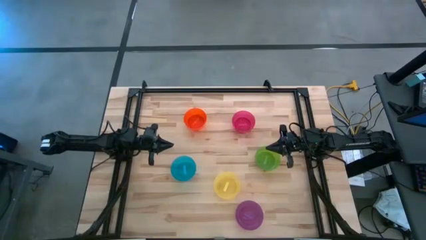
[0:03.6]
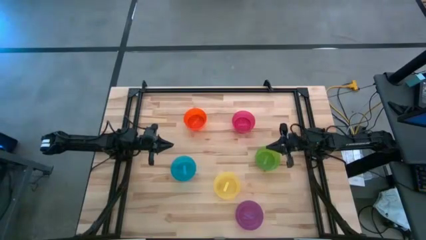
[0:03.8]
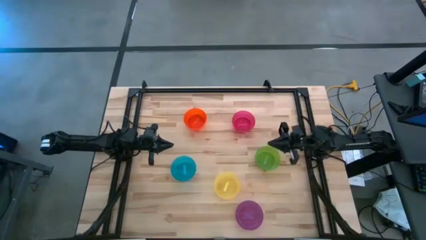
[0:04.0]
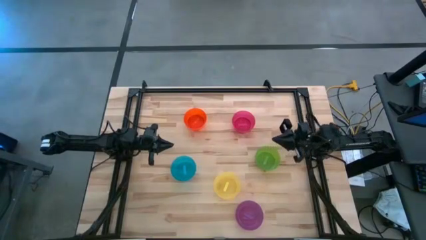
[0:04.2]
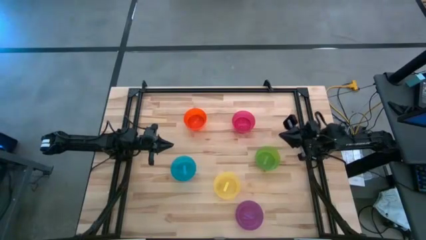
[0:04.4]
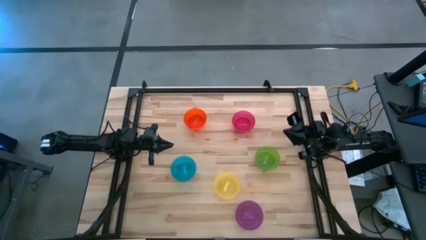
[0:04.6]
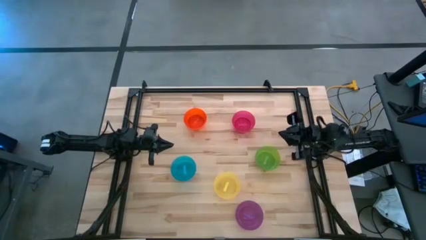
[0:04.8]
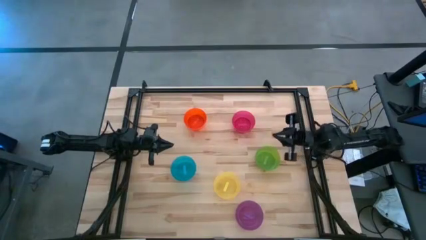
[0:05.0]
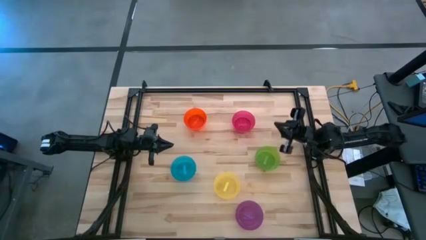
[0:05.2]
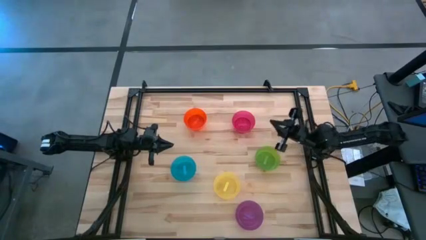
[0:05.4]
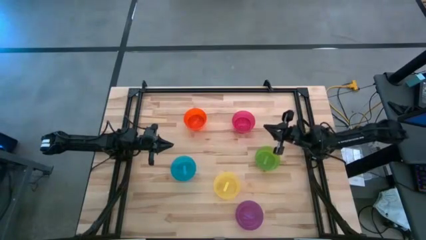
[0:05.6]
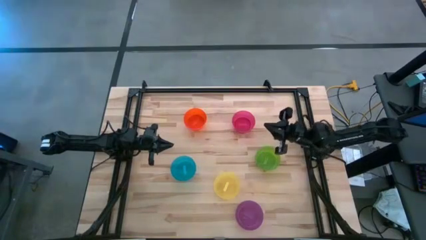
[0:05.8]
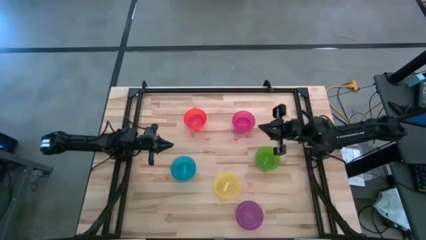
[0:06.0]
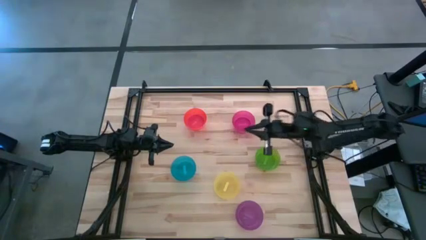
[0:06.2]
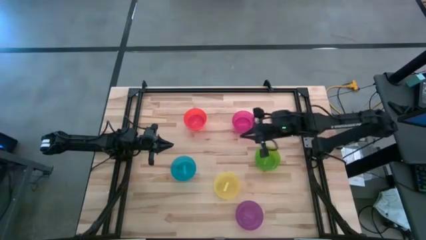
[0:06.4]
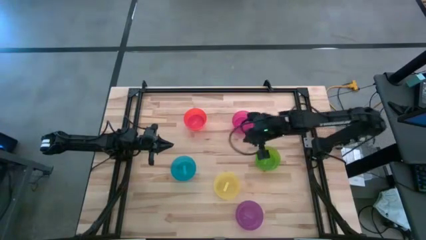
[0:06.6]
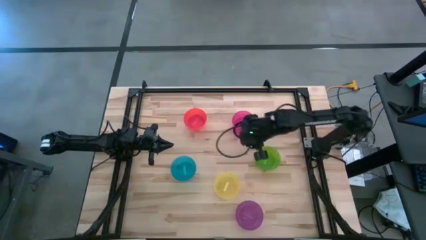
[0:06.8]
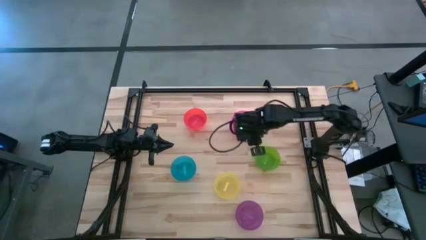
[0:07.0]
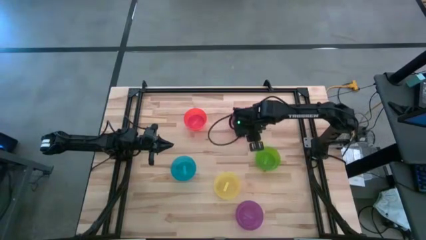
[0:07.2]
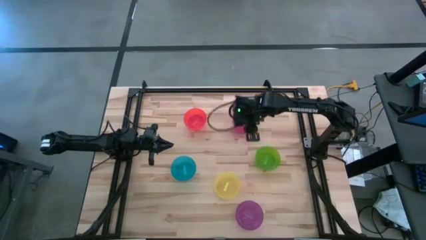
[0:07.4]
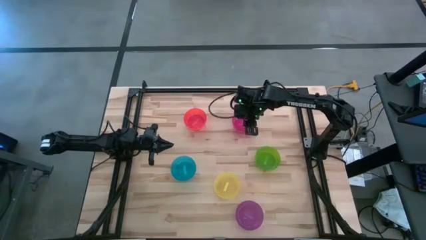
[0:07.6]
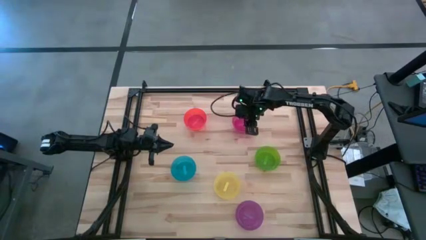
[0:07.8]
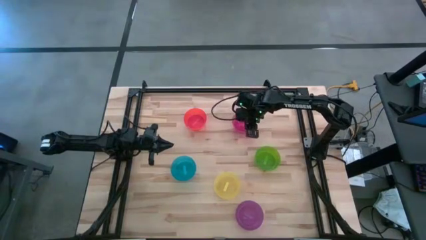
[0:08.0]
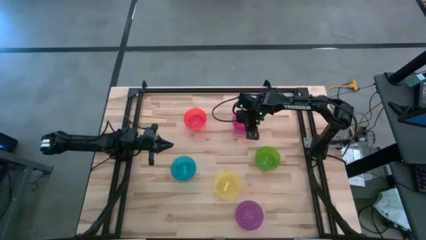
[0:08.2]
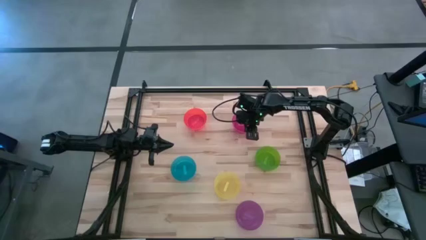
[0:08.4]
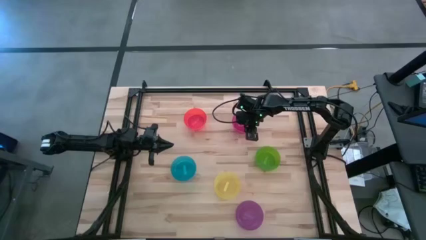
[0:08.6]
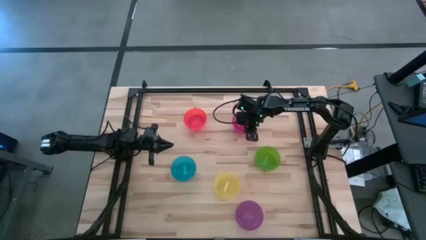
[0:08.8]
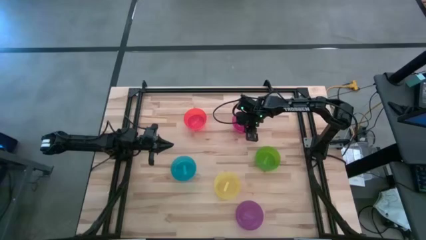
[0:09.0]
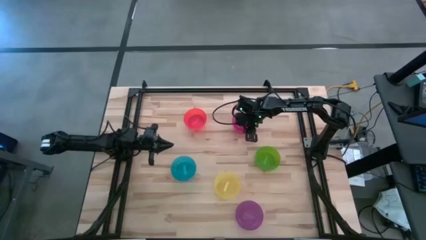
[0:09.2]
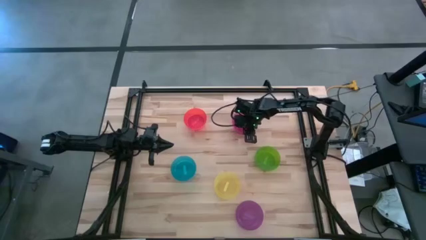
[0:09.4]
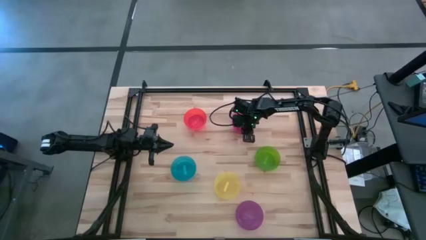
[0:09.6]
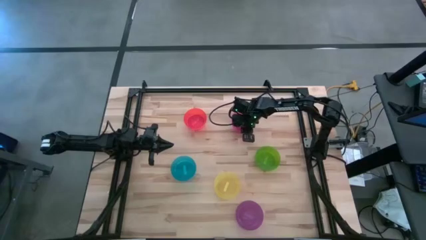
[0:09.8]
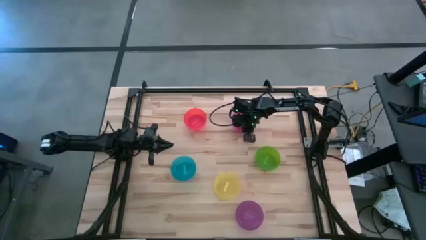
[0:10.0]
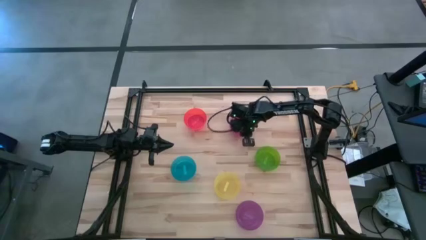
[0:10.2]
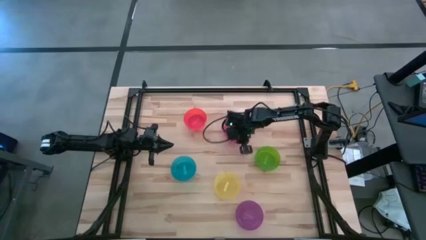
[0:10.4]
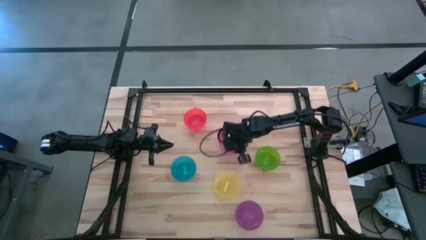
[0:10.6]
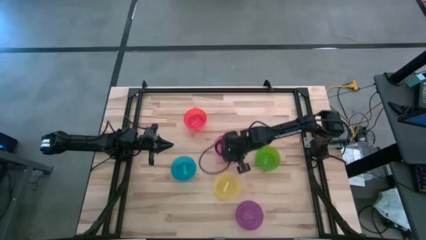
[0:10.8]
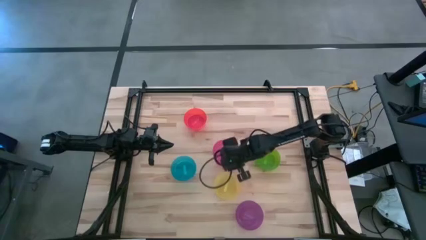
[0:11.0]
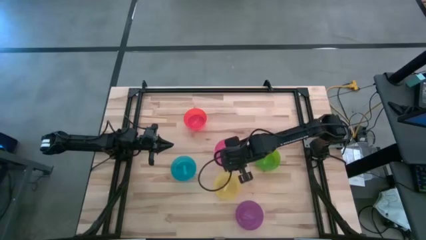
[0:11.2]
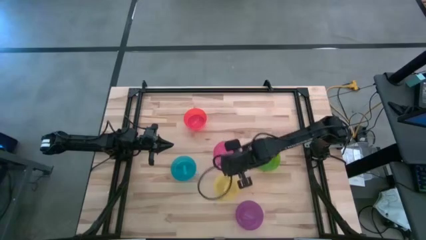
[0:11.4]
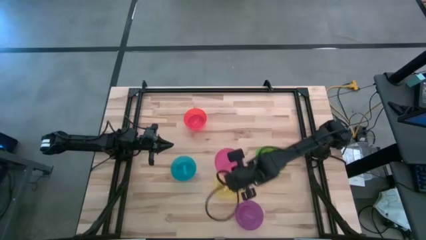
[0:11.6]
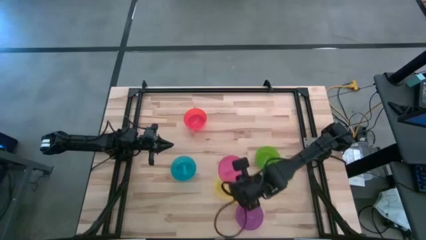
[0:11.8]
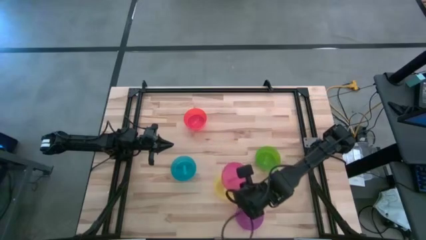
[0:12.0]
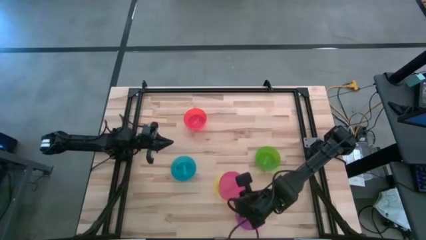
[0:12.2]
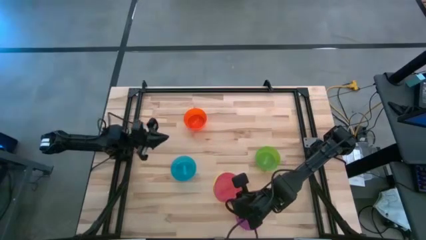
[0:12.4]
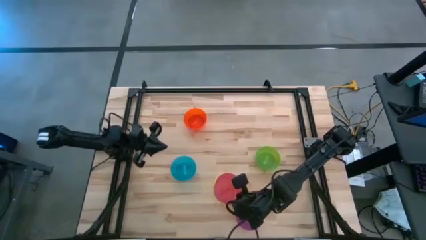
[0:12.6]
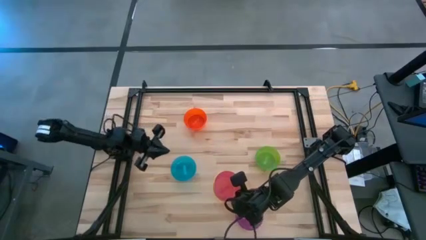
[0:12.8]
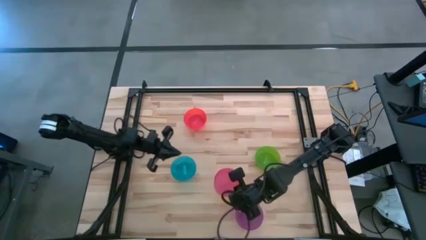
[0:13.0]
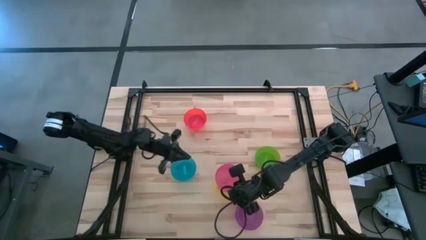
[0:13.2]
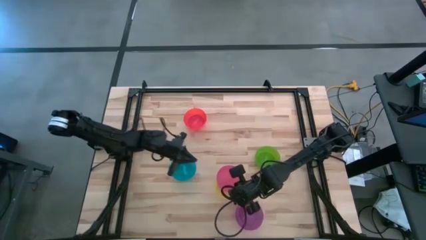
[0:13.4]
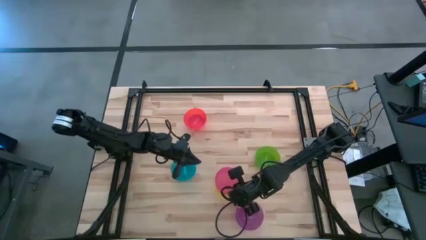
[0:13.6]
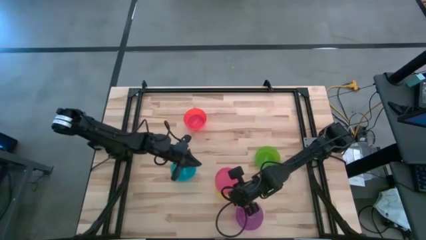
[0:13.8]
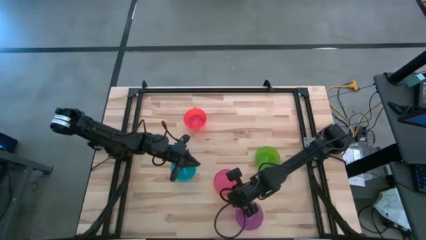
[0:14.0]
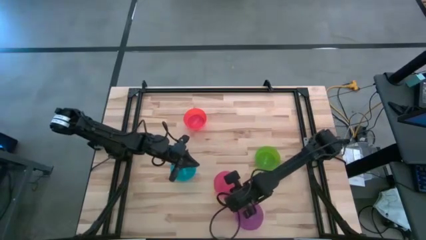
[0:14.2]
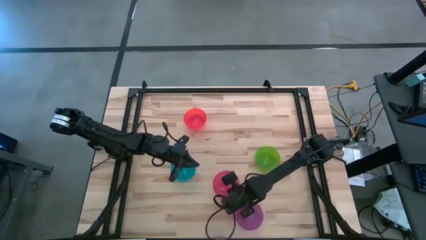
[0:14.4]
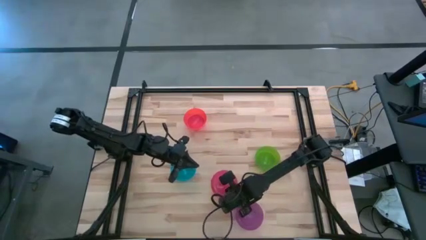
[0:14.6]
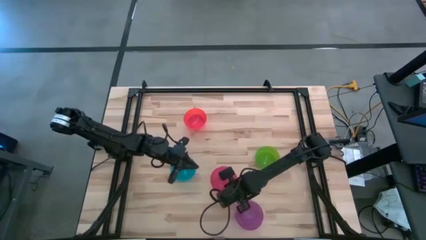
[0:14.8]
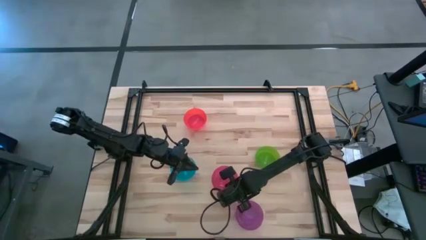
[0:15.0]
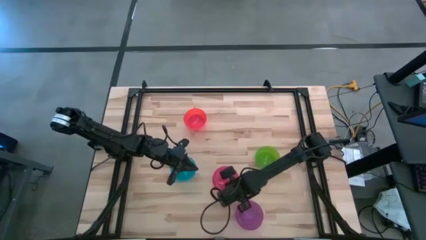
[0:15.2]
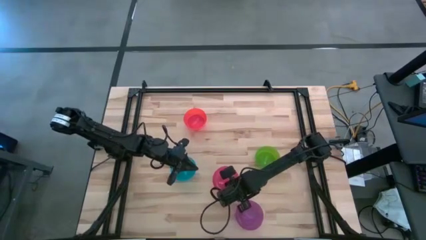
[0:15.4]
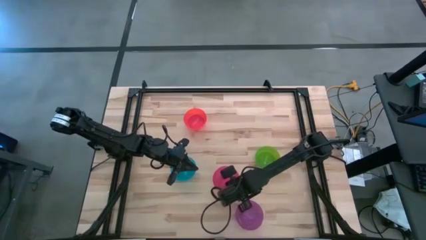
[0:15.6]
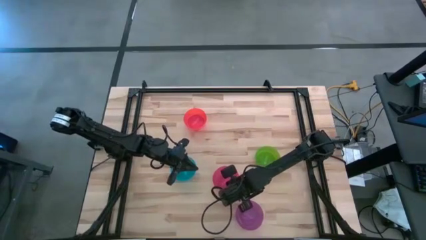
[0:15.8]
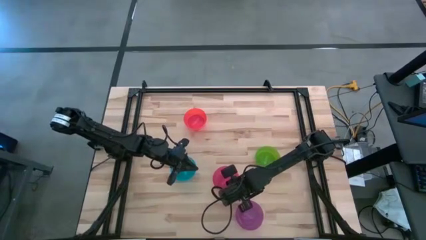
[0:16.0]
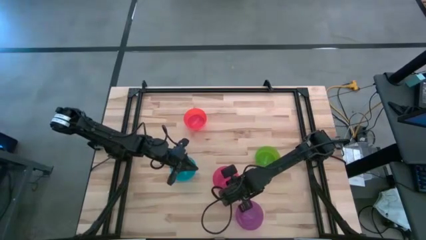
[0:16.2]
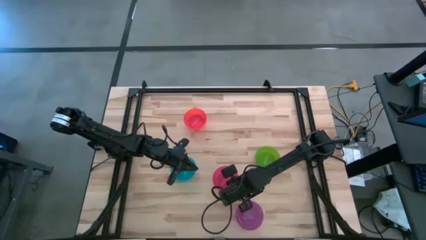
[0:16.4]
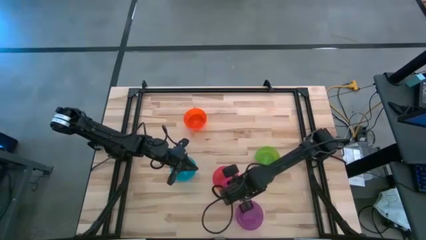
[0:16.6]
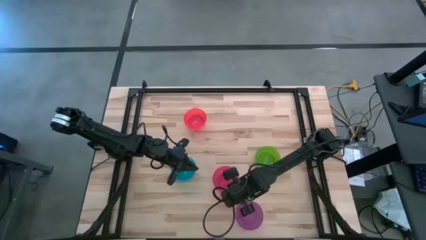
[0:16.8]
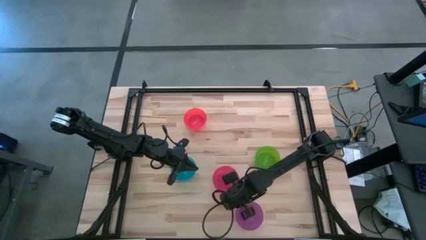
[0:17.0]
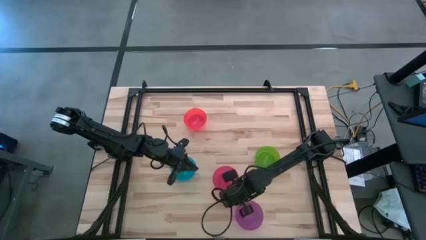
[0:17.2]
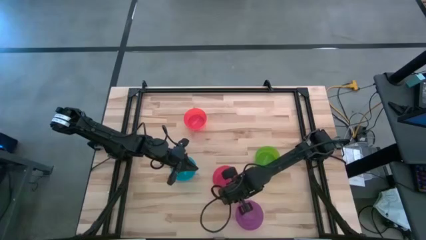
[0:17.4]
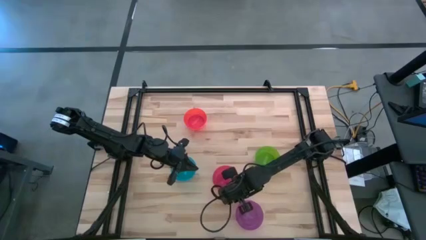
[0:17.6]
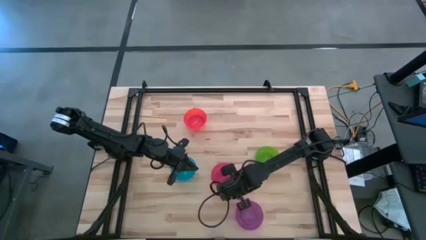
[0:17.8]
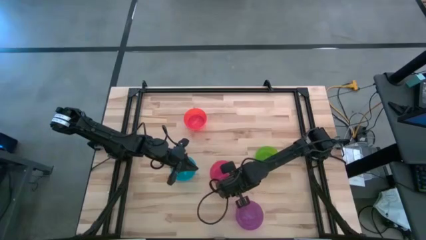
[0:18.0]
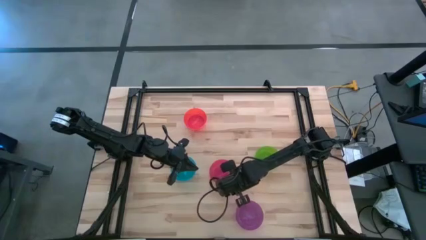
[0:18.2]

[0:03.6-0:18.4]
Task: Nest bowls inside each other
Stack the pink bowl on the yellow bowl
